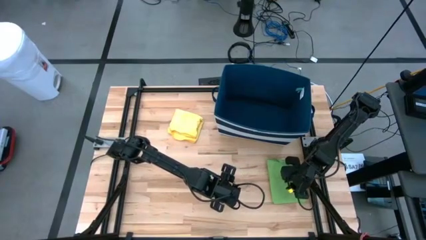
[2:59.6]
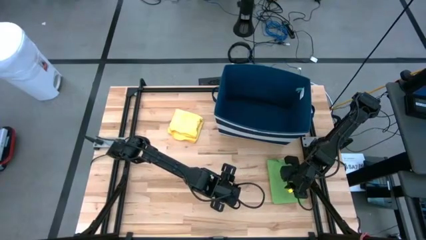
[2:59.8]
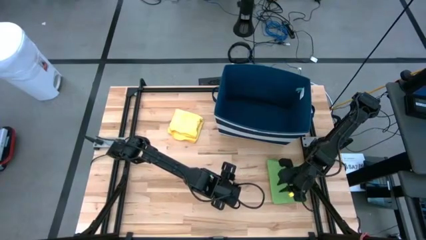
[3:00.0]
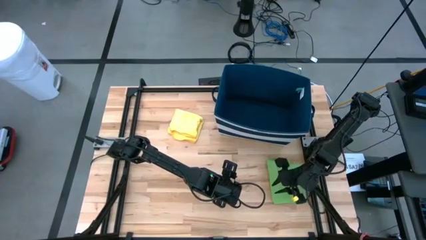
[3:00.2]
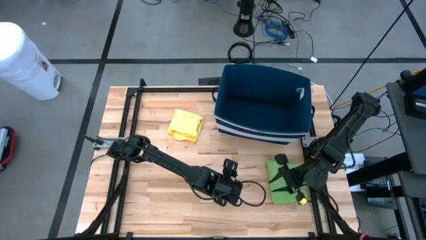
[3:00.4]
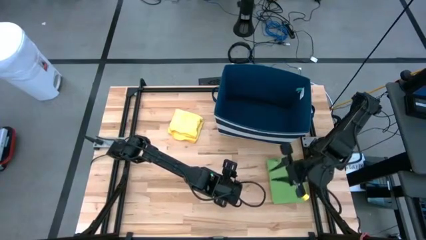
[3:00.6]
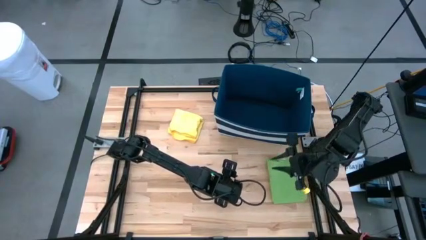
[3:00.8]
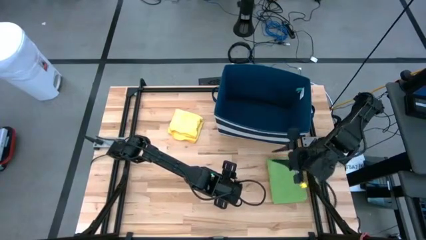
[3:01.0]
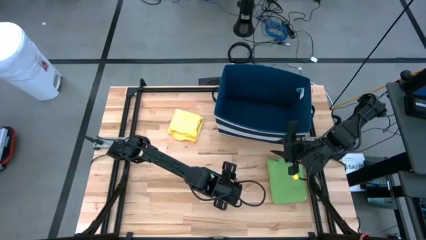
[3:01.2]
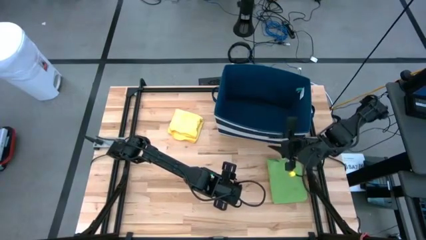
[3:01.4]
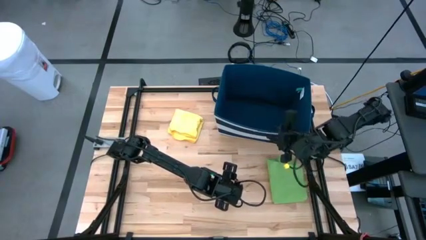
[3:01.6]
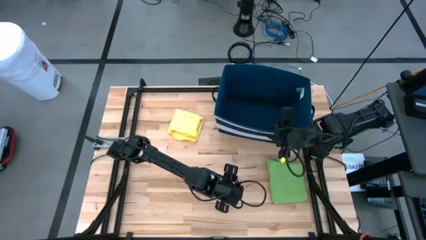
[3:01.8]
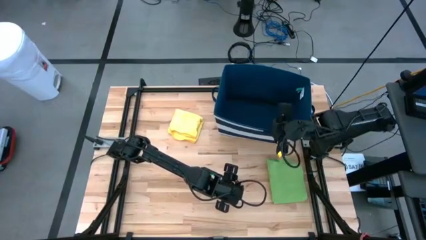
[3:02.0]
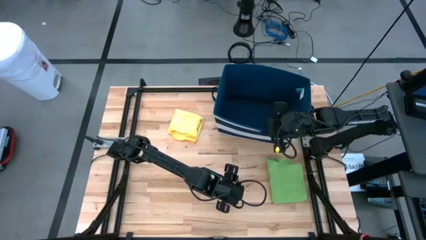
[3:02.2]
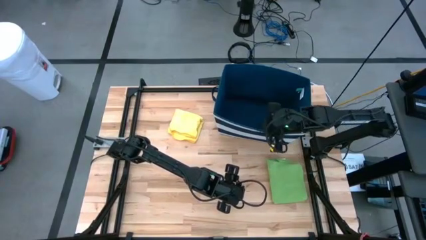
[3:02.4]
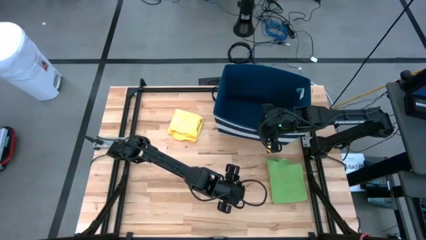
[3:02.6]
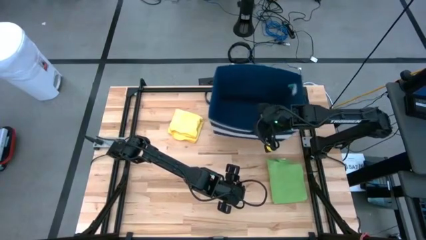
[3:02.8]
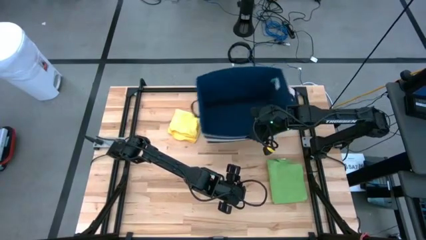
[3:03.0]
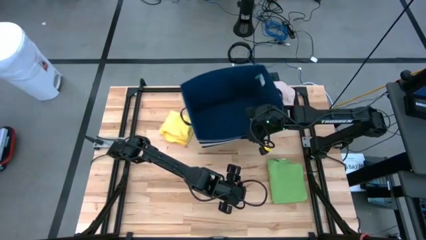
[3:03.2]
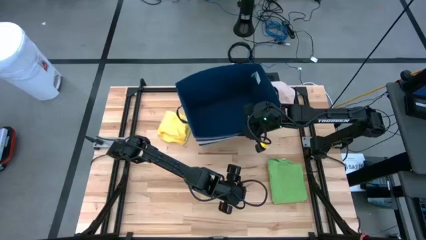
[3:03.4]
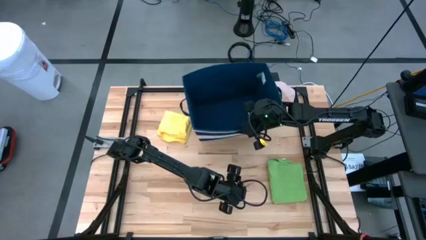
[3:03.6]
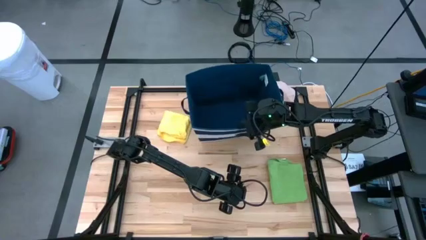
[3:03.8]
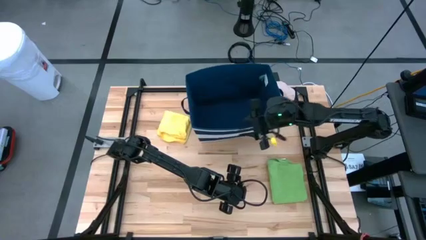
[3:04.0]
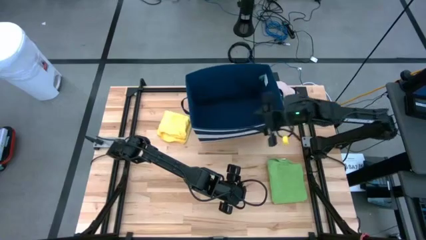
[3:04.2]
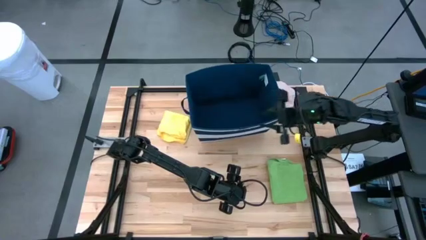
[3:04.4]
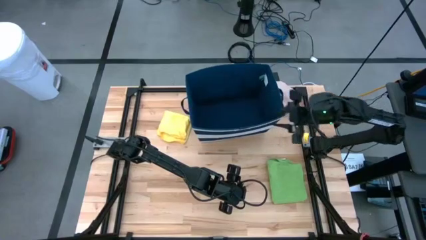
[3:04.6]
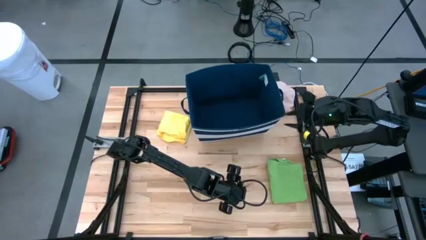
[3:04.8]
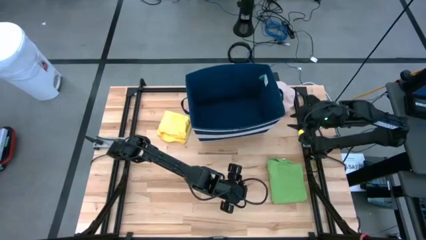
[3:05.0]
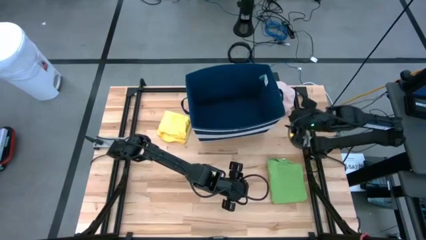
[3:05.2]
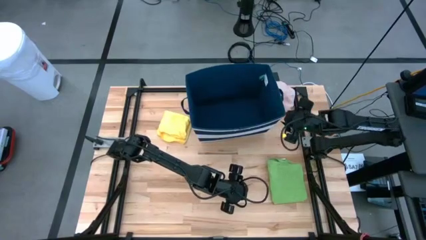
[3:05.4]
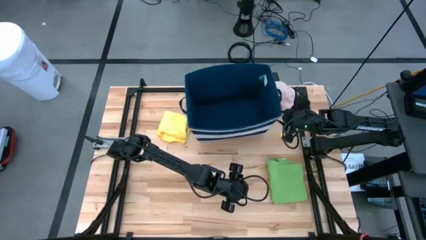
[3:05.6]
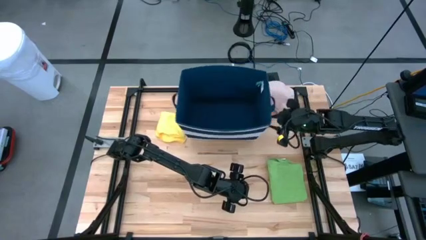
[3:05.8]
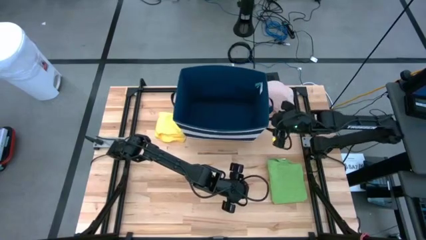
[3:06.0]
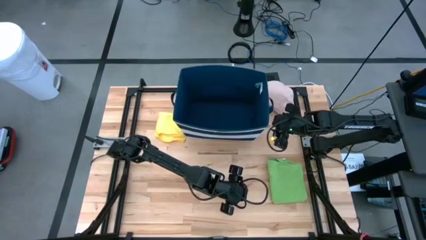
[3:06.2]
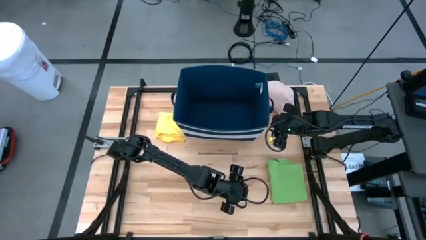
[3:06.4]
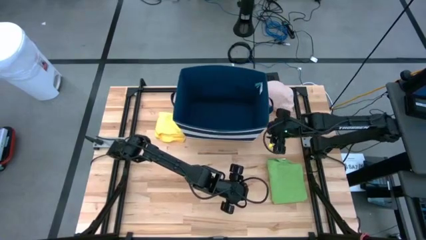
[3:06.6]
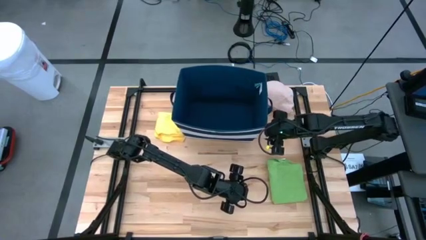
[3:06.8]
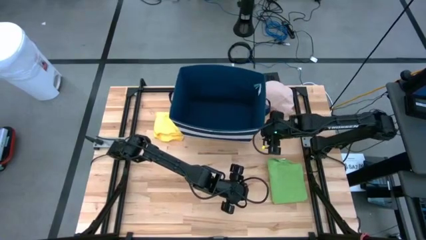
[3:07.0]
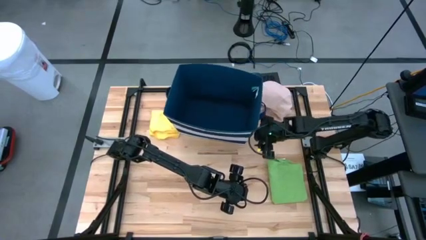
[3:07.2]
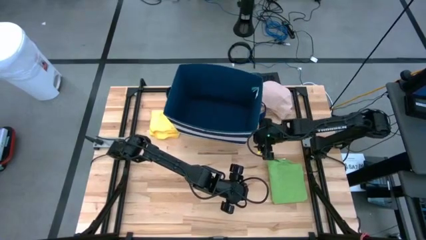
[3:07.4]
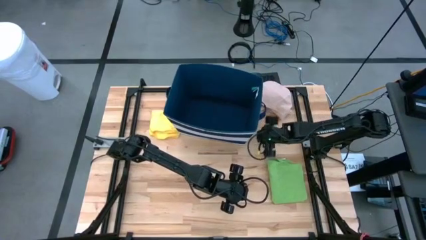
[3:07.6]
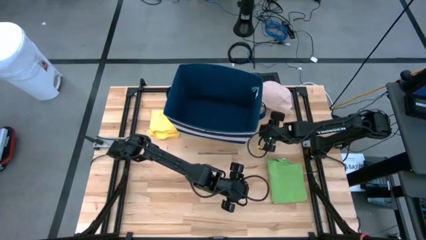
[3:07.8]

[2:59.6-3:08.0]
Task: Fold towel
Adjust the blue bin

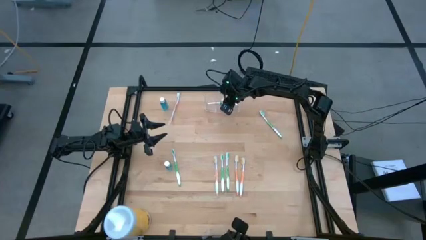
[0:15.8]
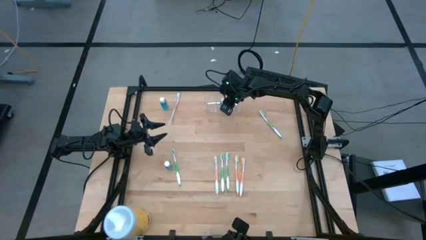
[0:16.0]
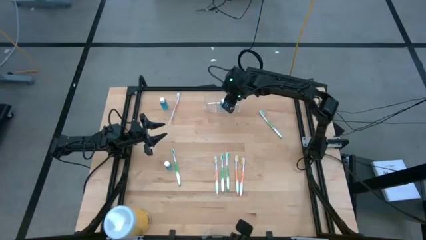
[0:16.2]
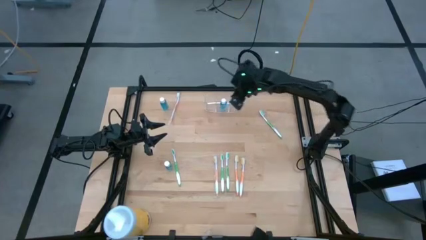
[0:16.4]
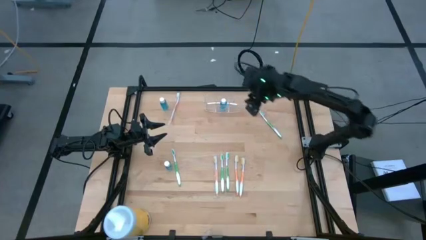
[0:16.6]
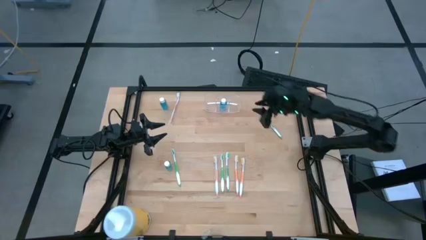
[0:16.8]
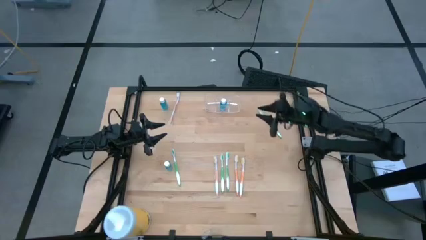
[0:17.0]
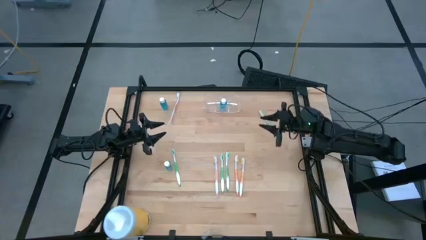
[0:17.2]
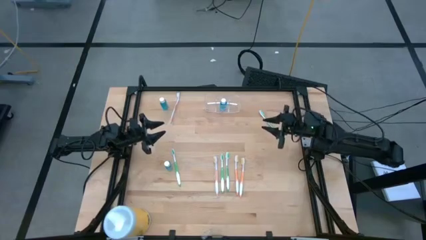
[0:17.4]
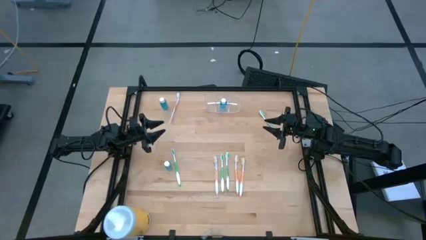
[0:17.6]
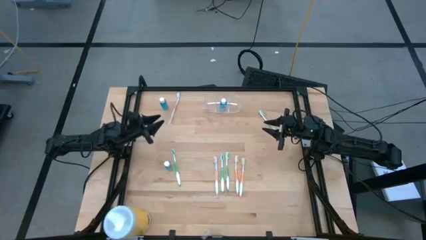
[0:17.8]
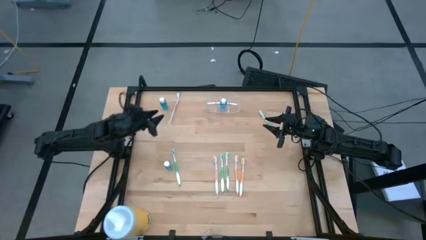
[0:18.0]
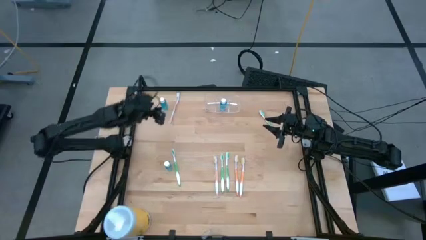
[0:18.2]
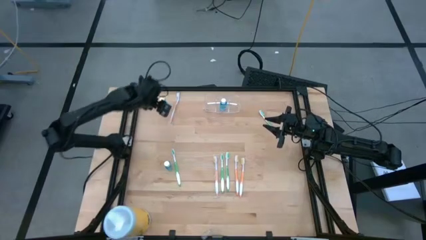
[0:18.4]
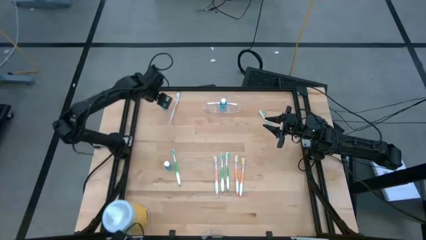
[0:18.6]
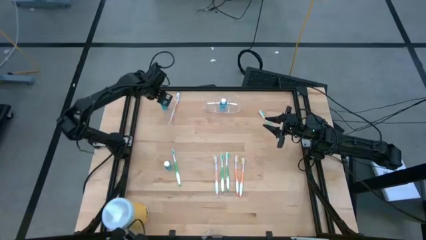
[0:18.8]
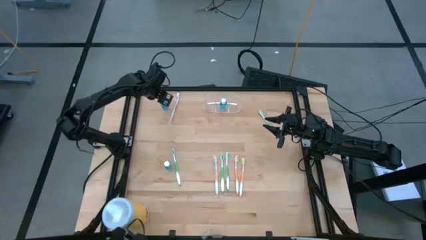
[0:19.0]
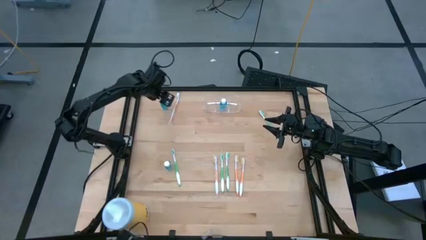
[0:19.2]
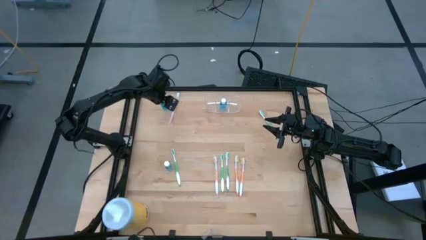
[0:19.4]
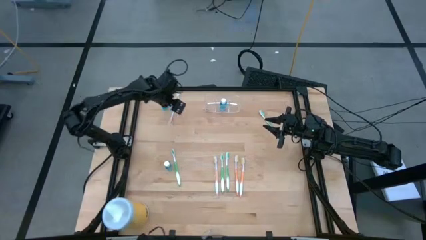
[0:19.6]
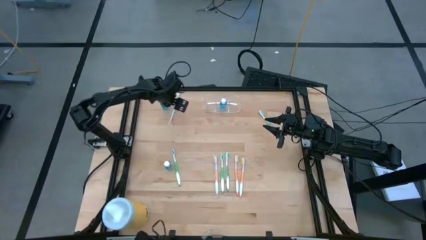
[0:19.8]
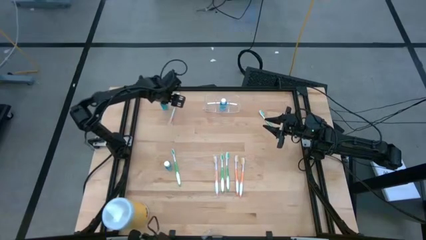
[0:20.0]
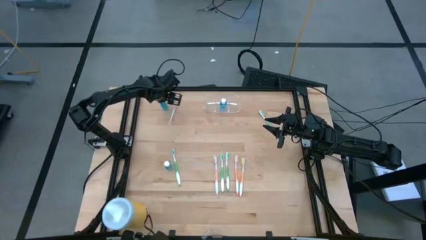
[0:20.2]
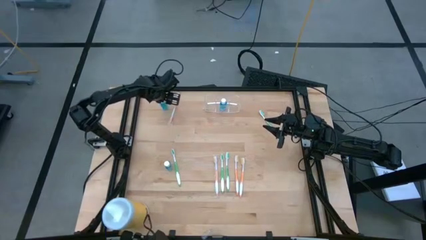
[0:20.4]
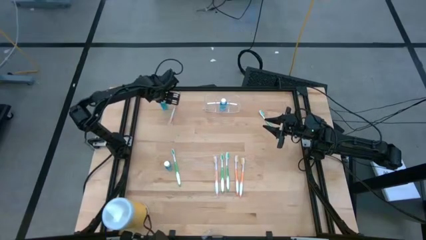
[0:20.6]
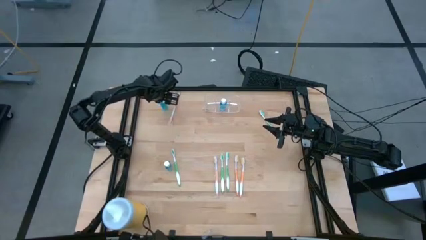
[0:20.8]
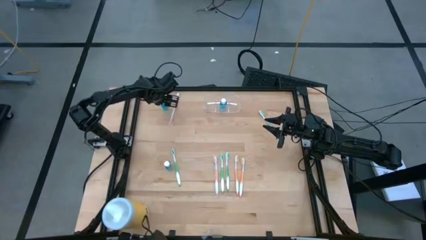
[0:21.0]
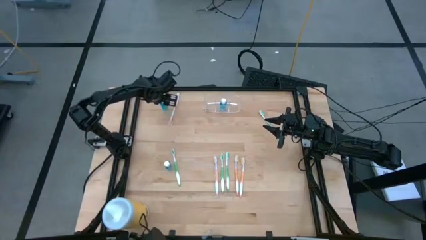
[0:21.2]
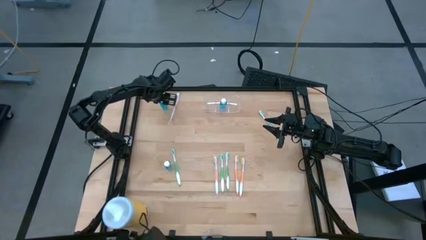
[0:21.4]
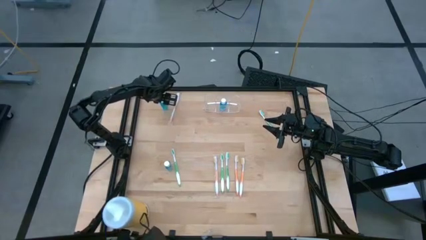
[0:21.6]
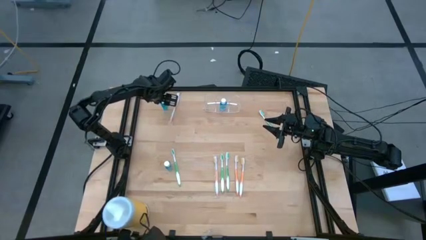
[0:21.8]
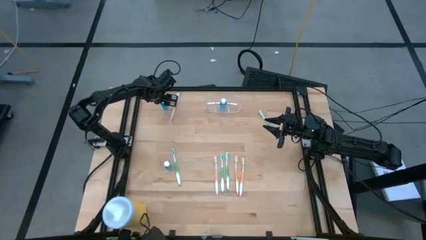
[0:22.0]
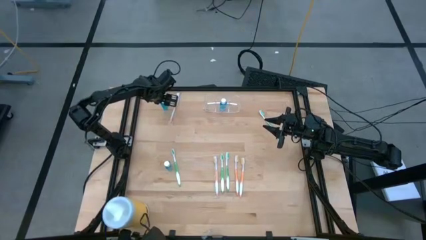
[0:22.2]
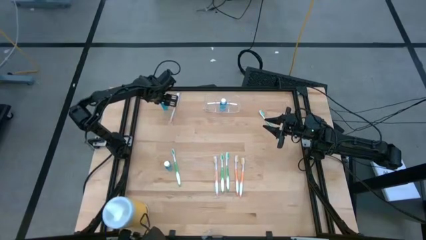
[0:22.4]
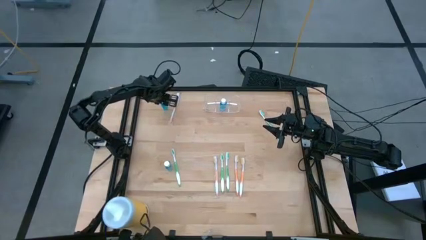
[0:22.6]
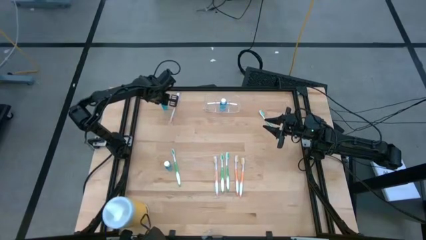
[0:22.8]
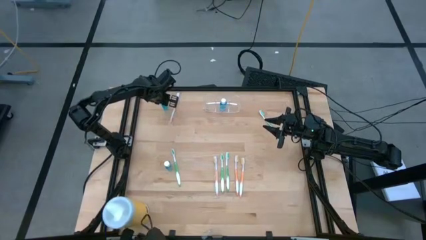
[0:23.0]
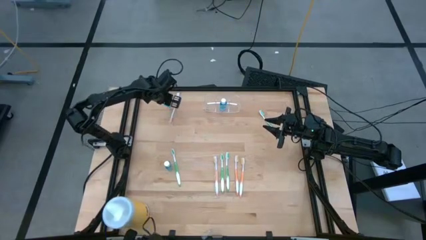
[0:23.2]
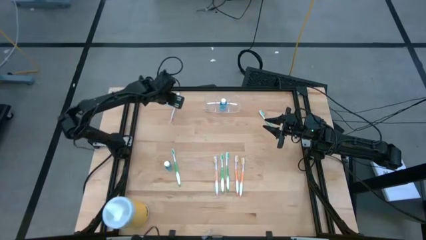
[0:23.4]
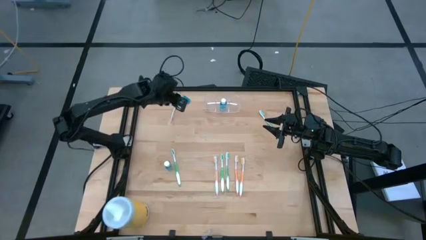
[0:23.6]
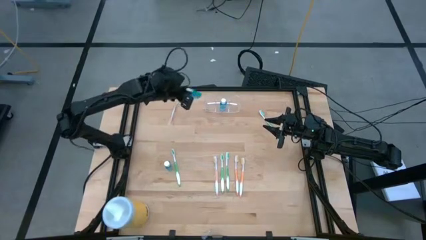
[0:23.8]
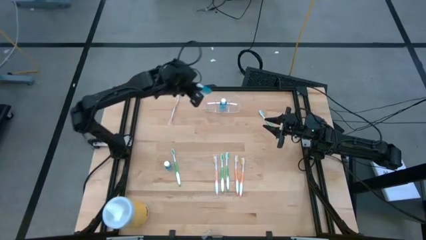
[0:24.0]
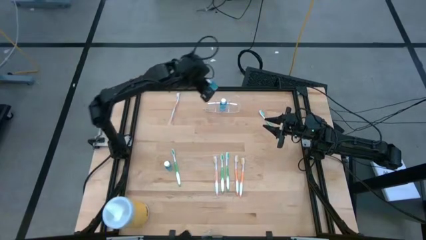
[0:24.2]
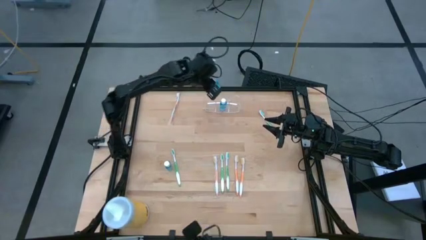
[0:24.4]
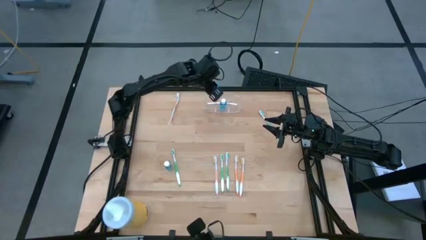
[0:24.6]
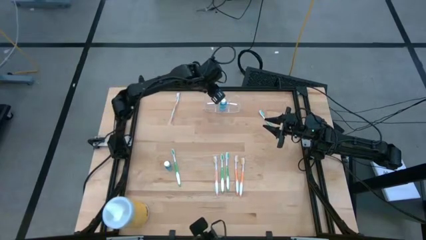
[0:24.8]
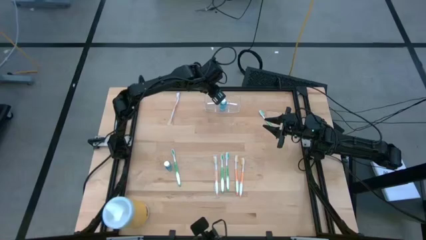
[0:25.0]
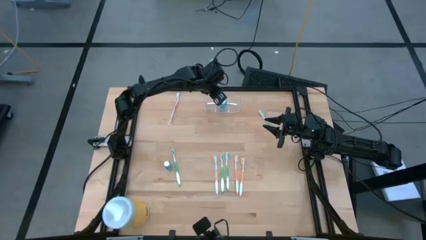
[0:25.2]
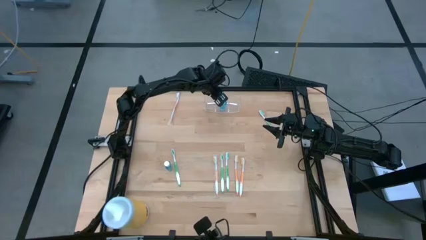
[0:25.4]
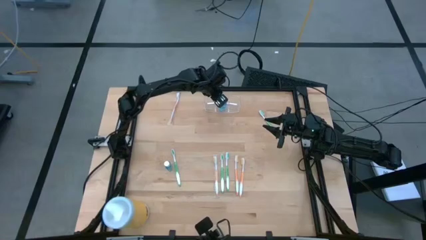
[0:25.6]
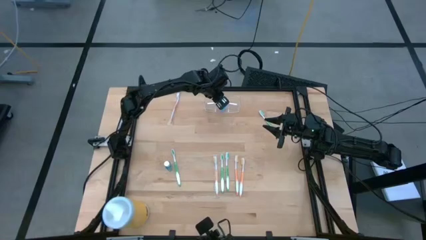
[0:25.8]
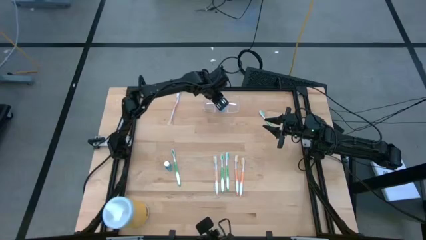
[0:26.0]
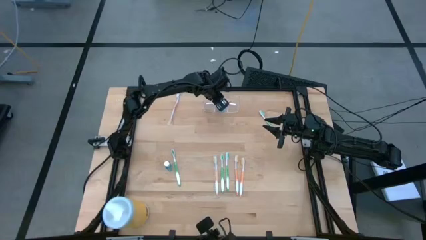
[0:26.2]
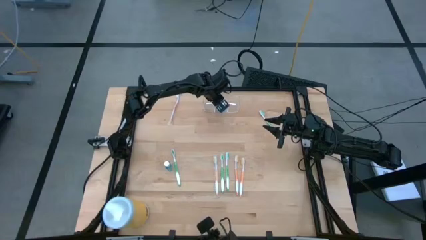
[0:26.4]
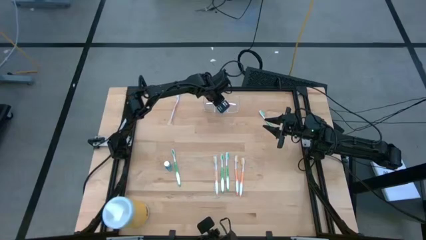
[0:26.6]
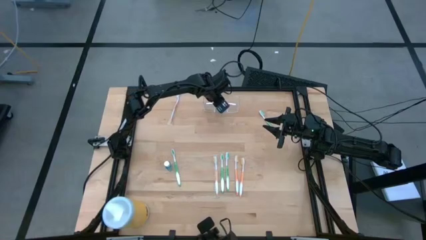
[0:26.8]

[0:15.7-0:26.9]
Task: Pick & Place toothbrushing station
Put the blue mouthwash into the transparent organizer
